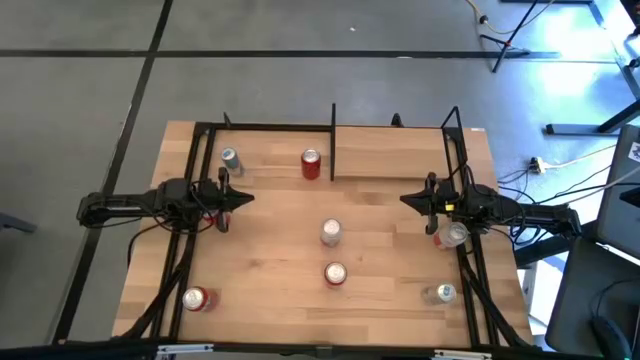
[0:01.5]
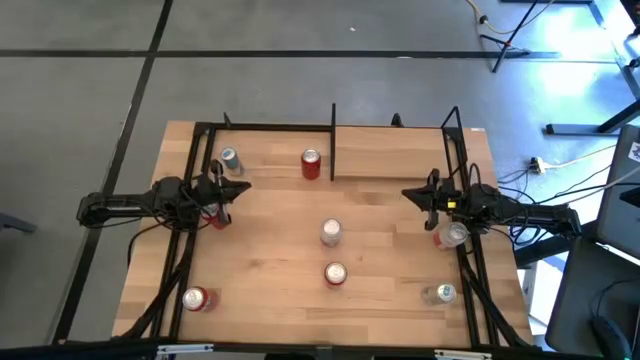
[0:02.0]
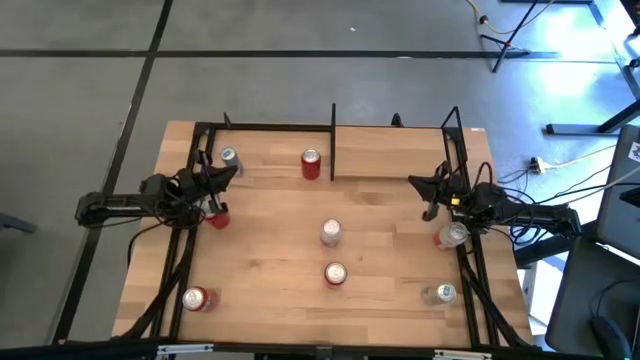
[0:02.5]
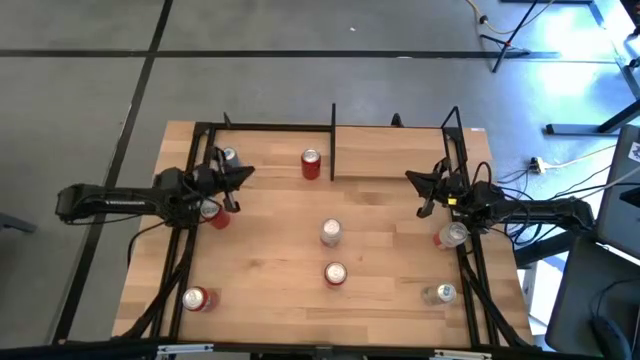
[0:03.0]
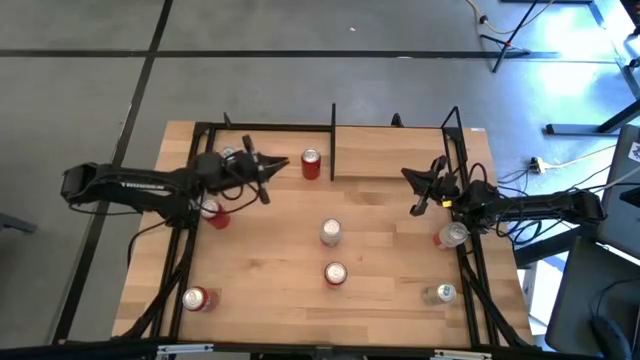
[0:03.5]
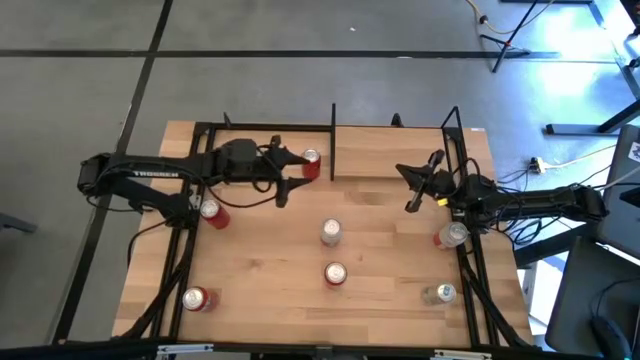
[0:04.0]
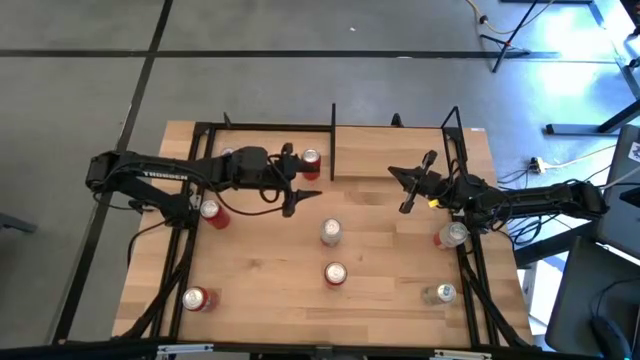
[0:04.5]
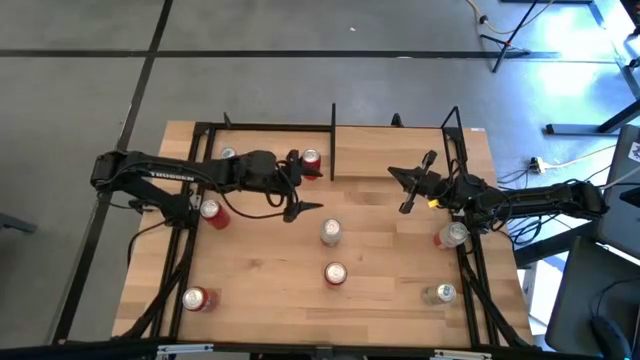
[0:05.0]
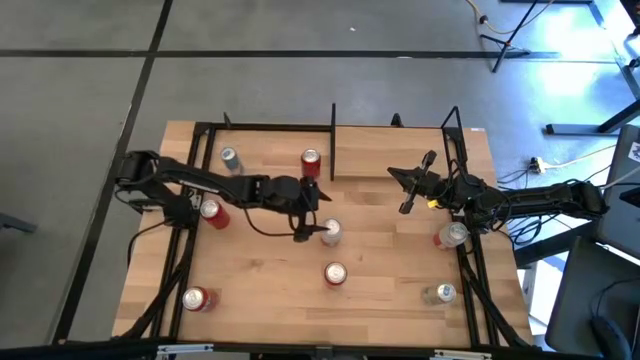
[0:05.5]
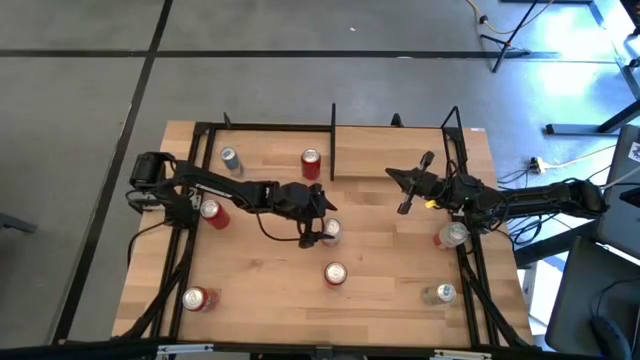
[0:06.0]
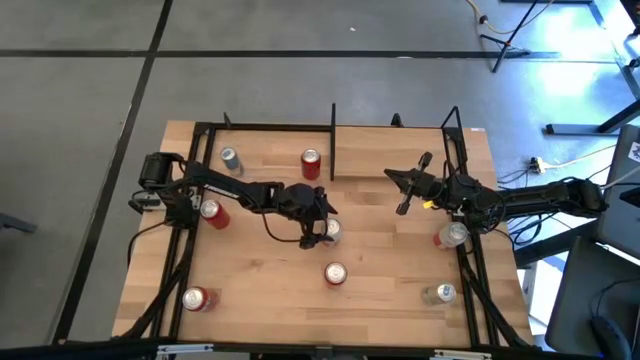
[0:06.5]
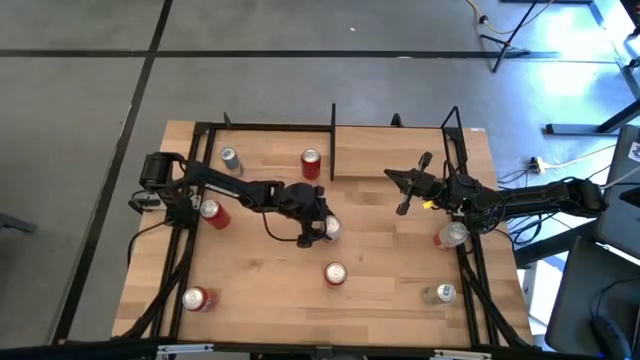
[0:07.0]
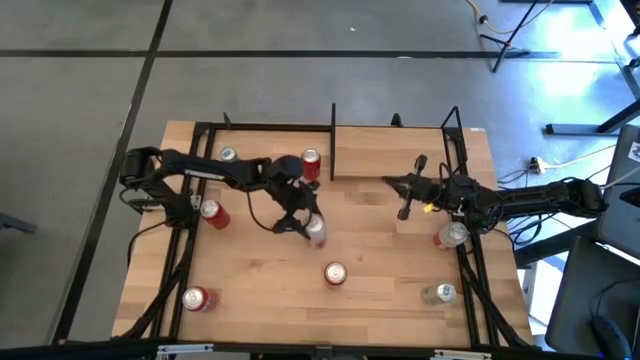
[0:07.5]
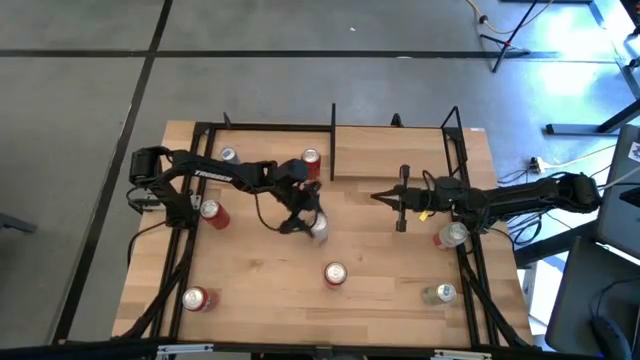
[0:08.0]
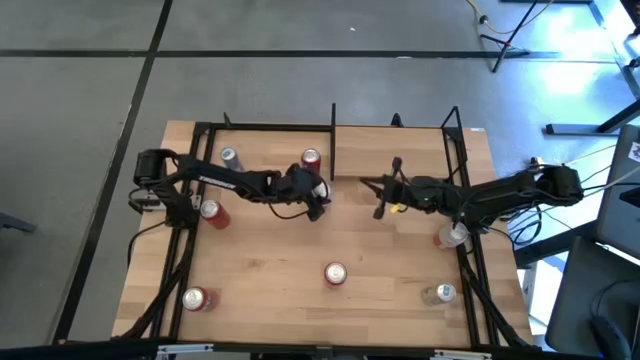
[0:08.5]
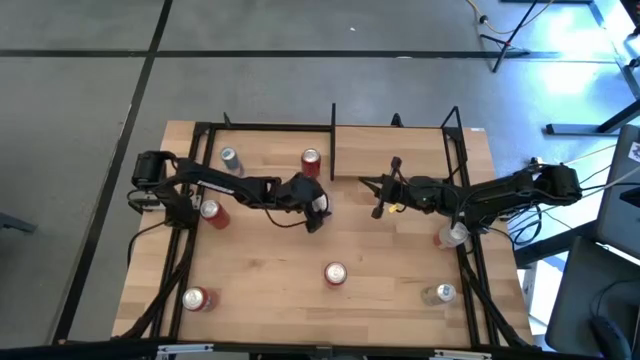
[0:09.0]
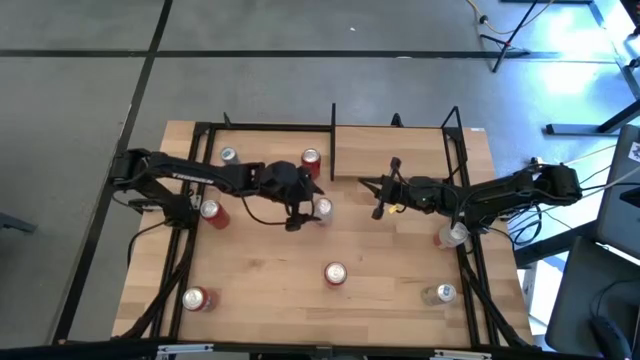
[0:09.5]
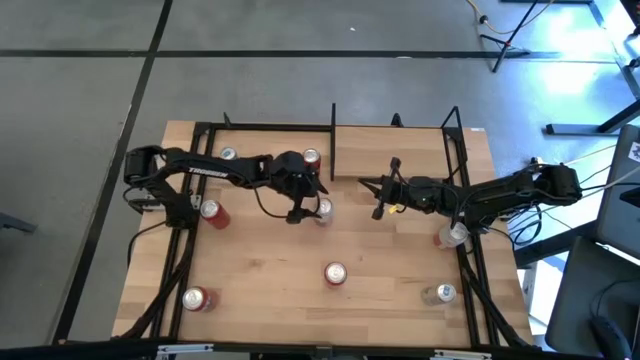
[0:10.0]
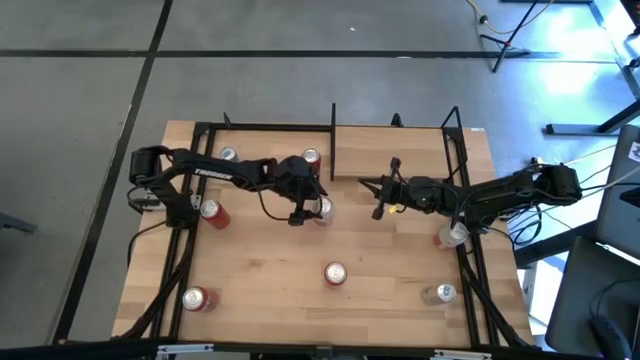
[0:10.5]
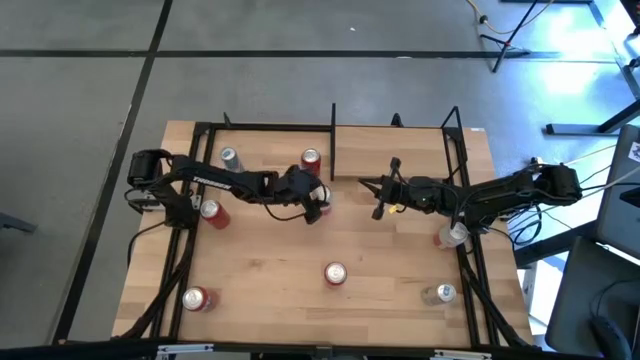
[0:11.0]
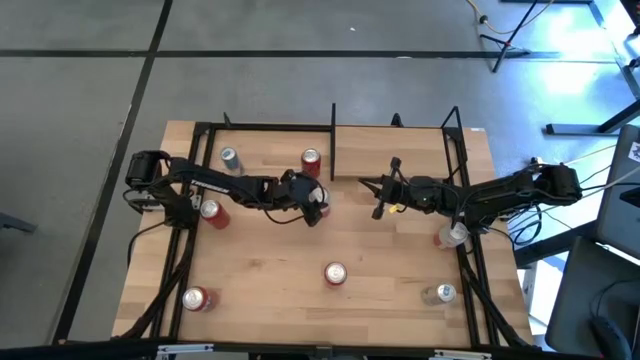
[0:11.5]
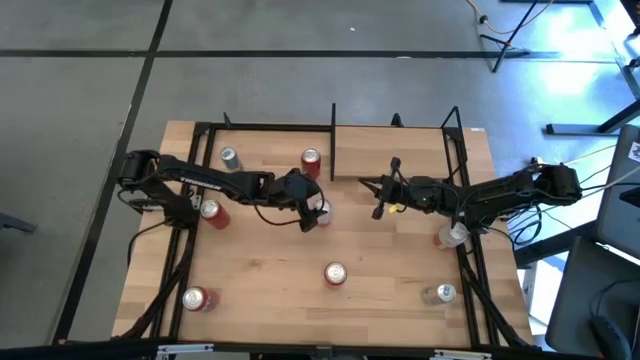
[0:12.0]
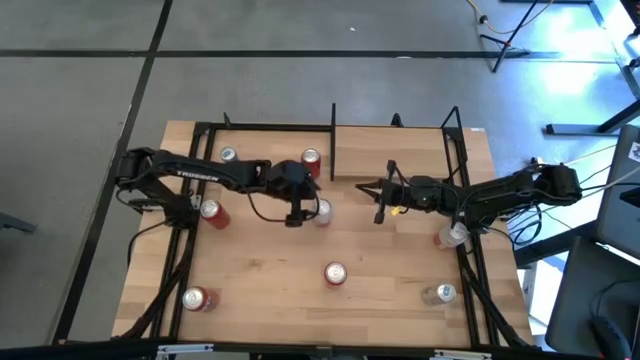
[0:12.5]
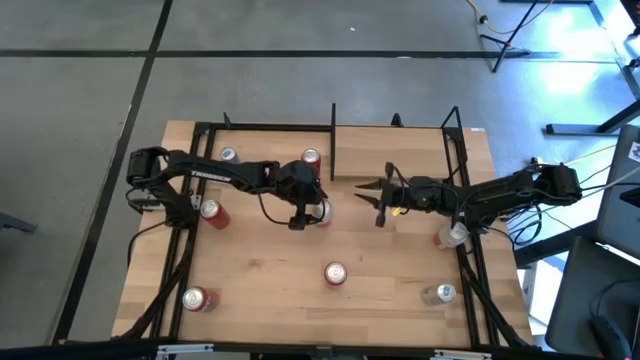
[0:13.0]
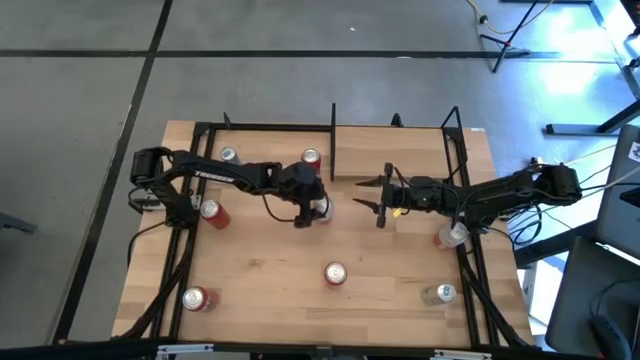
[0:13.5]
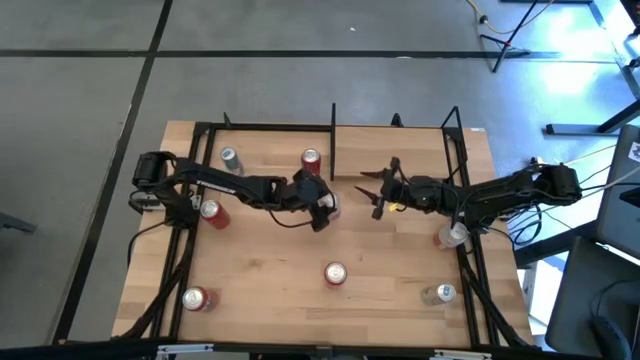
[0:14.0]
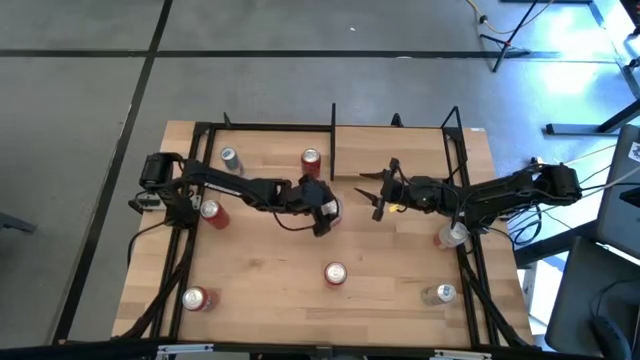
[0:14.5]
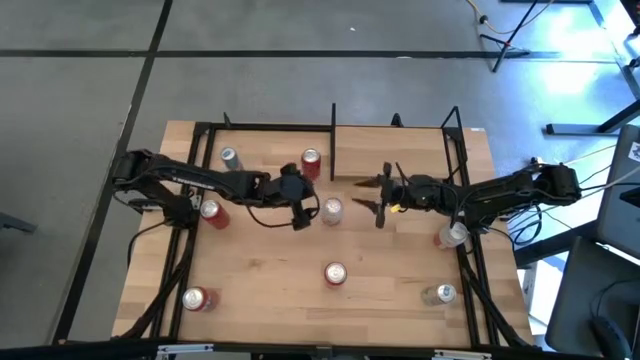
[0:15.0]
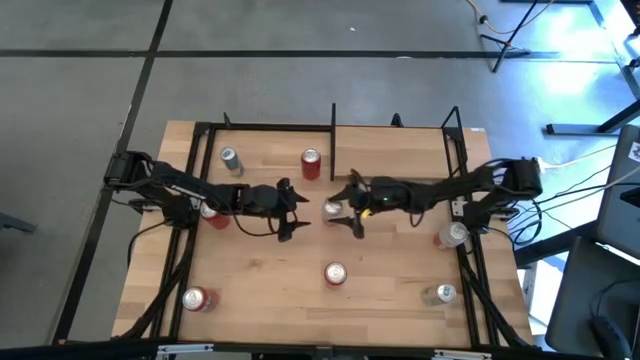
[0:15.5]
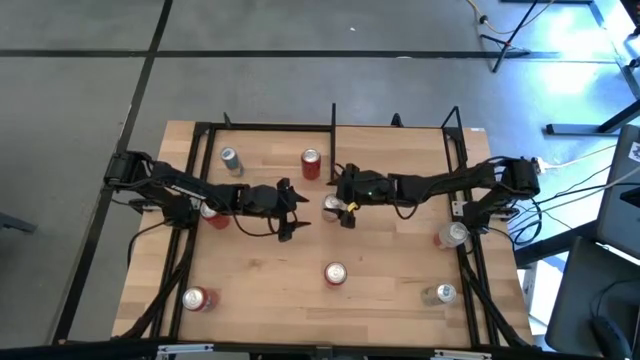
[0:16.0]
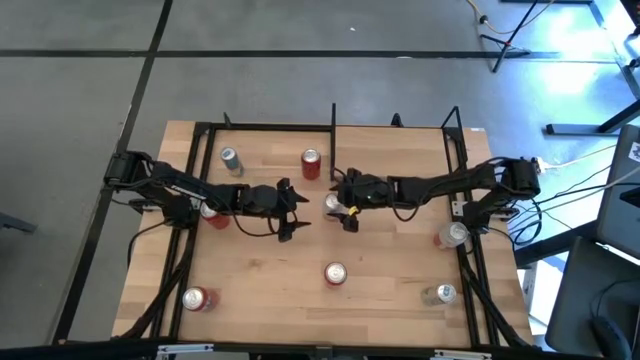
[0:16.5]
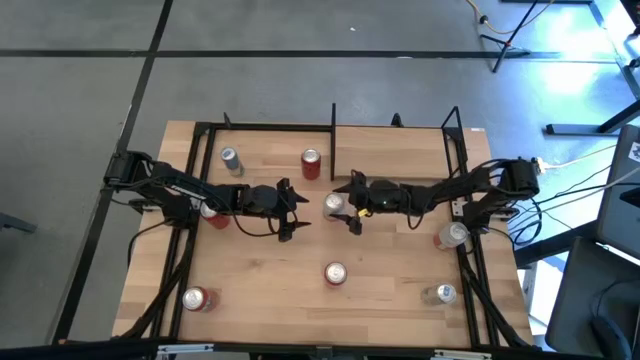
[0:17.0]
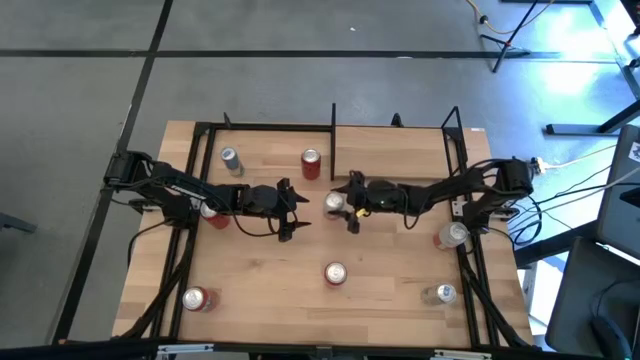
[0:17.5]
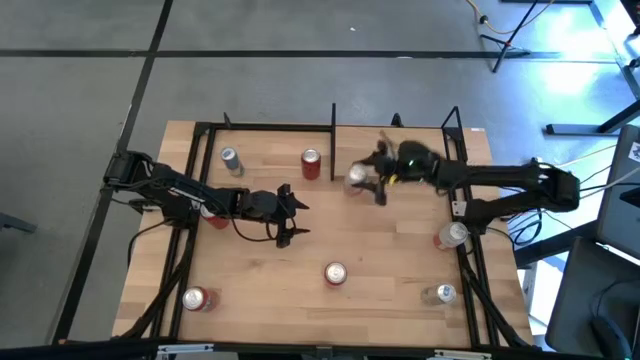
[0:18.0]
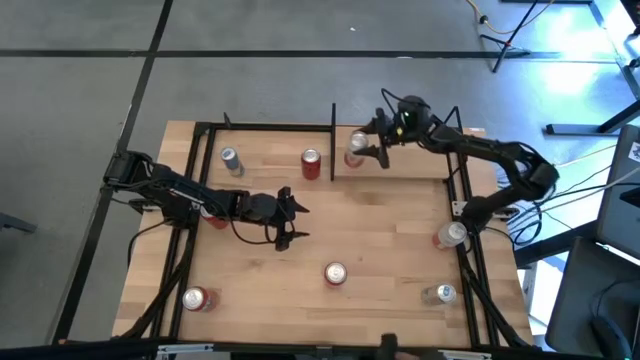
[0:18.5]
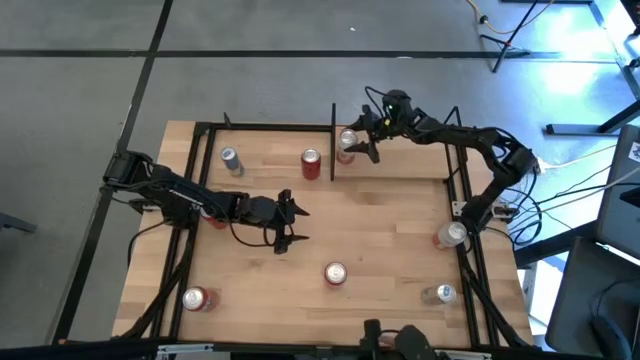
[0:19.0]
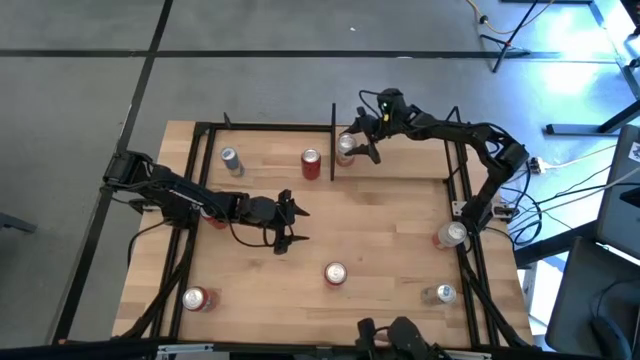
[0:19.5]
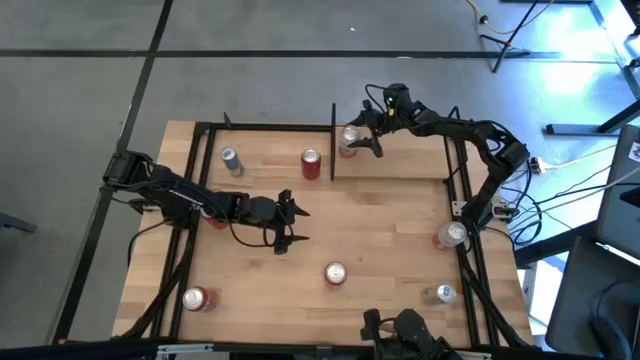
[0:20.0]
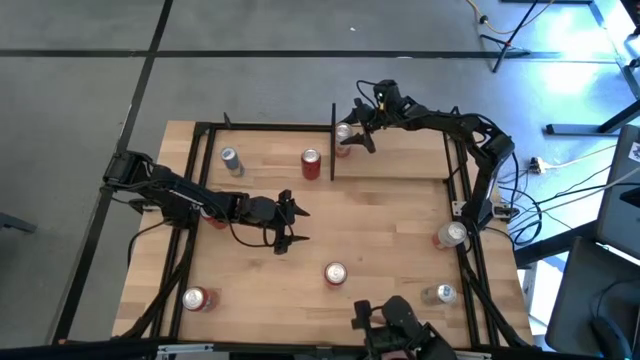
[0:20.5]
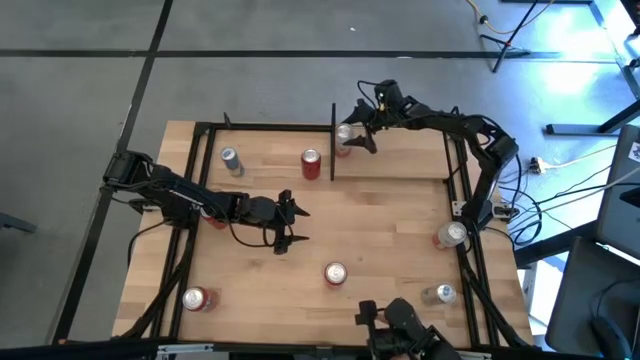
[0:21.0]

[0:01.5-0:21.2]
Task: Place canned beverage on shelf
Put the left pink white soda can on the shelf
